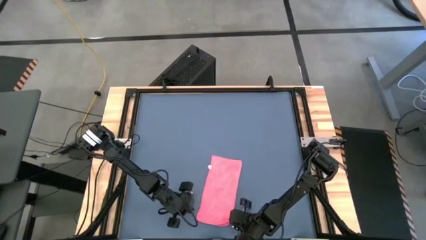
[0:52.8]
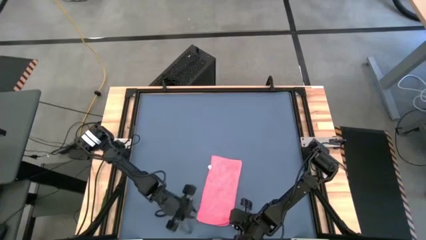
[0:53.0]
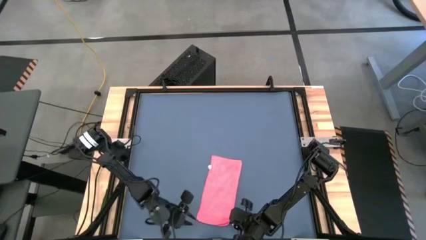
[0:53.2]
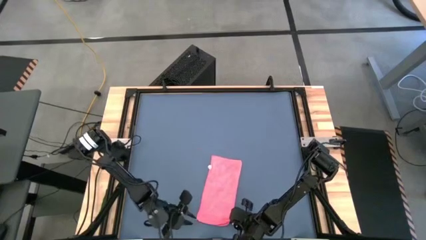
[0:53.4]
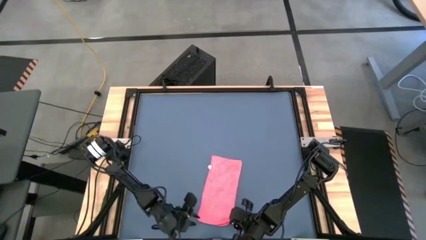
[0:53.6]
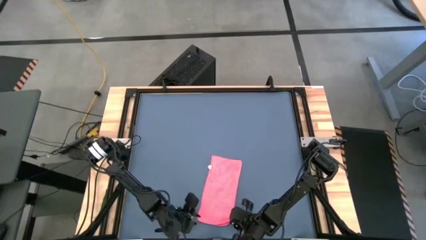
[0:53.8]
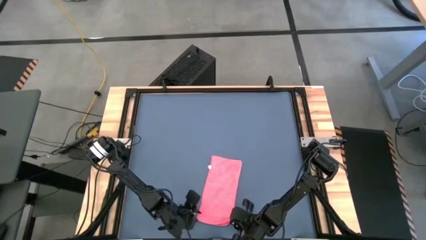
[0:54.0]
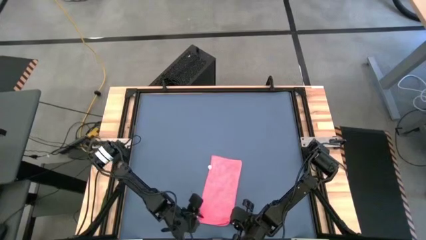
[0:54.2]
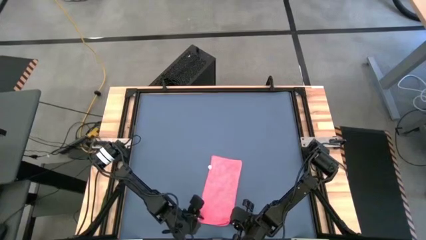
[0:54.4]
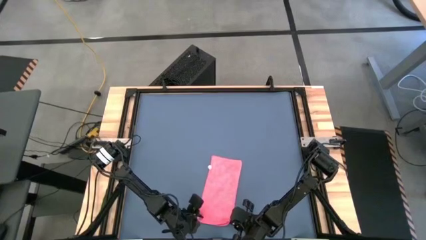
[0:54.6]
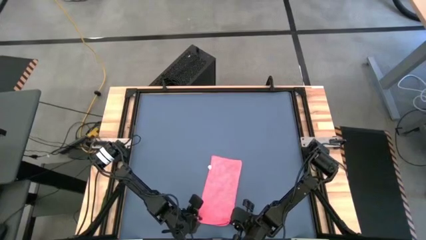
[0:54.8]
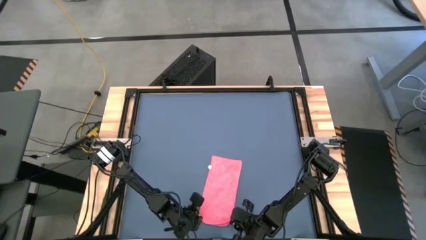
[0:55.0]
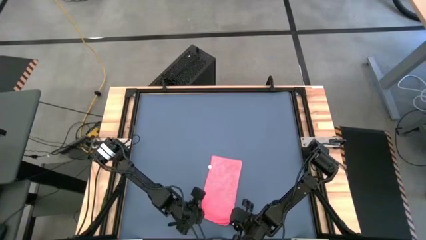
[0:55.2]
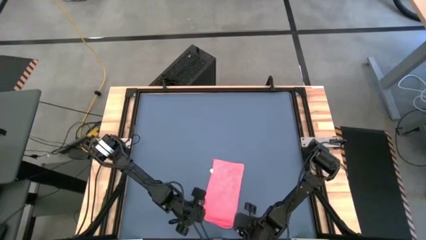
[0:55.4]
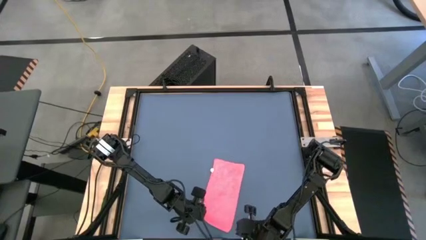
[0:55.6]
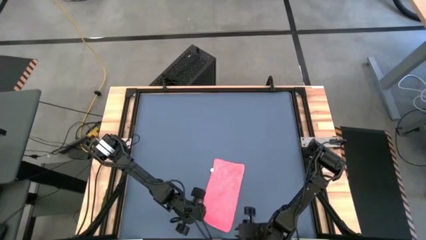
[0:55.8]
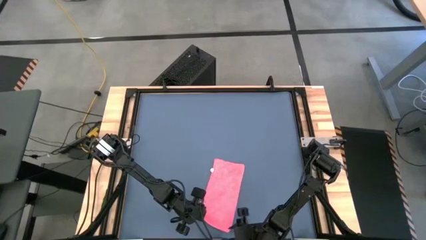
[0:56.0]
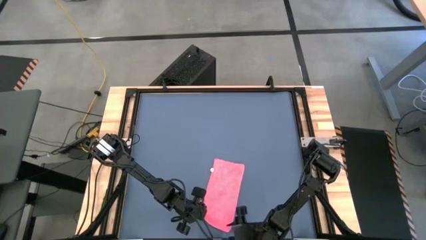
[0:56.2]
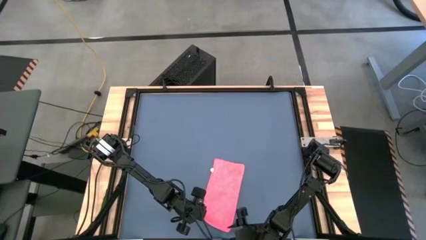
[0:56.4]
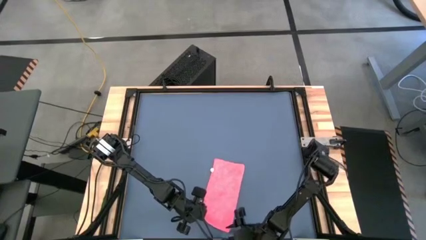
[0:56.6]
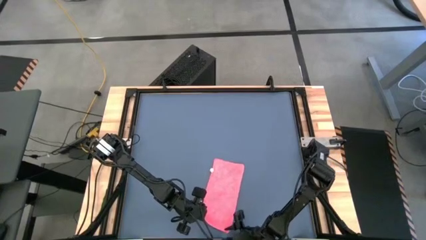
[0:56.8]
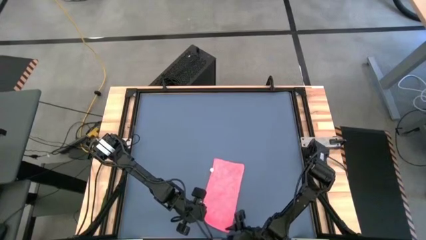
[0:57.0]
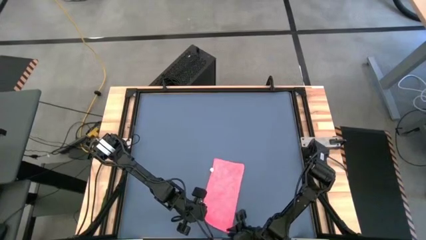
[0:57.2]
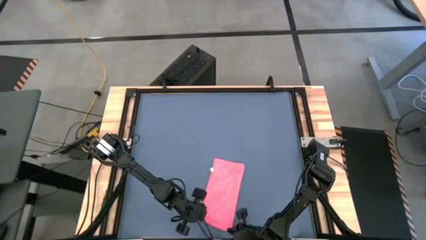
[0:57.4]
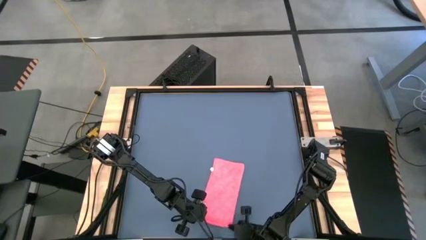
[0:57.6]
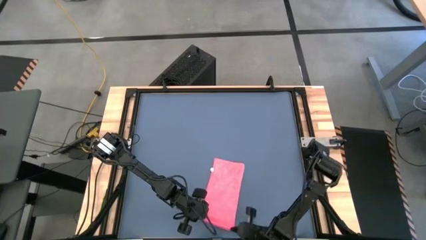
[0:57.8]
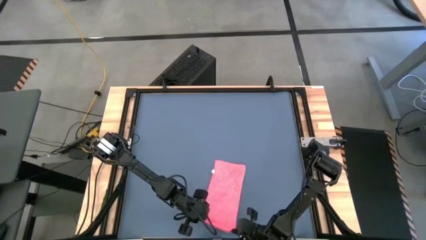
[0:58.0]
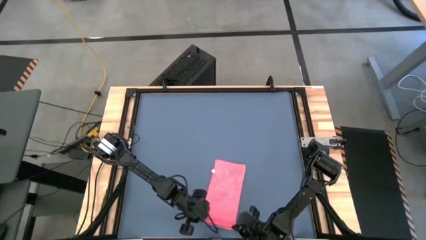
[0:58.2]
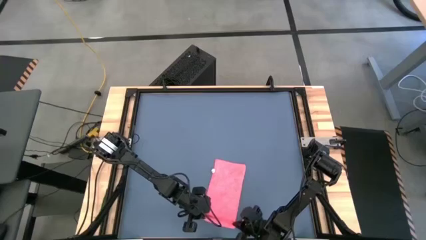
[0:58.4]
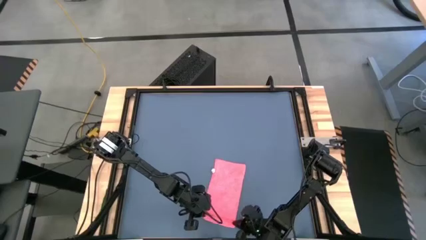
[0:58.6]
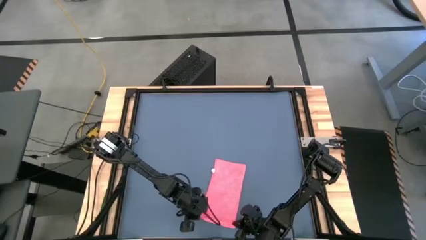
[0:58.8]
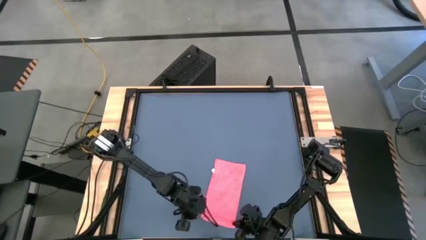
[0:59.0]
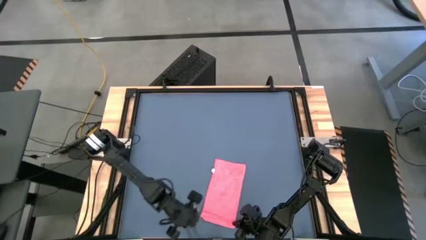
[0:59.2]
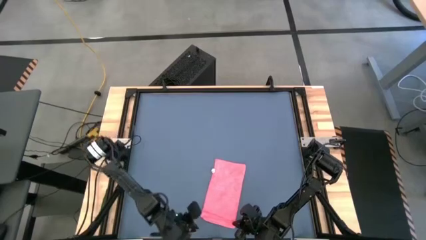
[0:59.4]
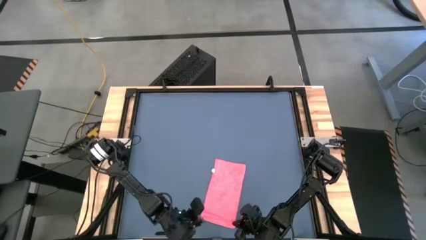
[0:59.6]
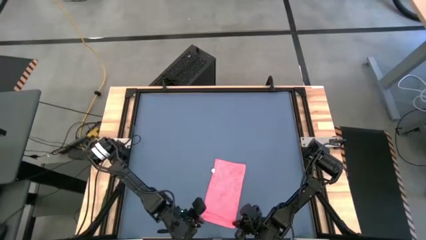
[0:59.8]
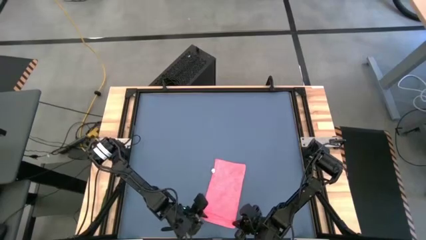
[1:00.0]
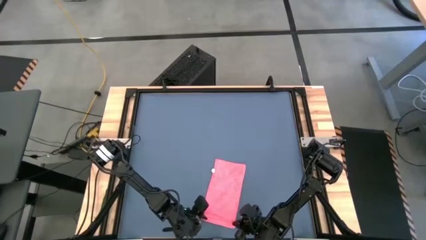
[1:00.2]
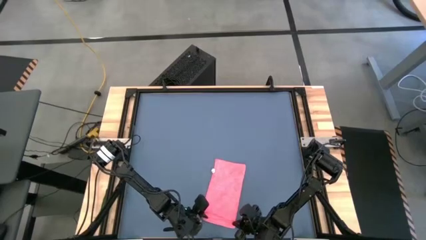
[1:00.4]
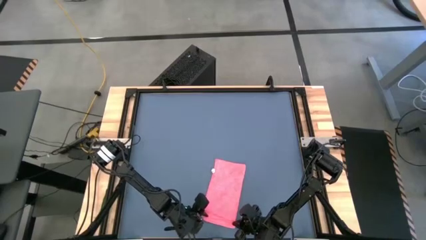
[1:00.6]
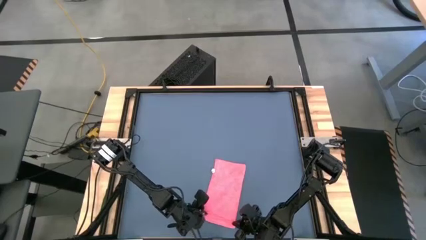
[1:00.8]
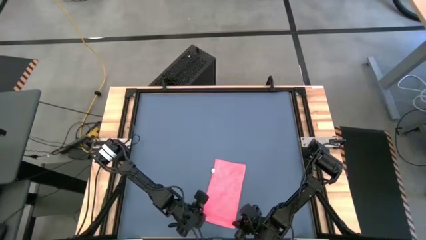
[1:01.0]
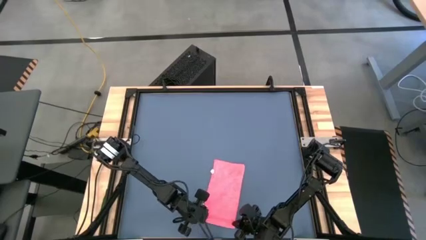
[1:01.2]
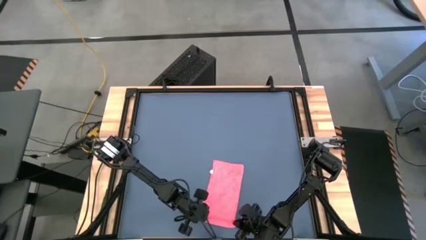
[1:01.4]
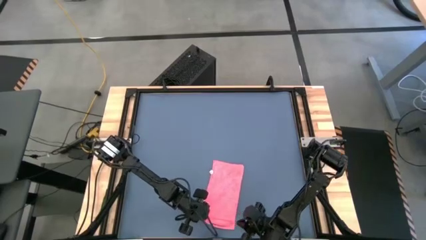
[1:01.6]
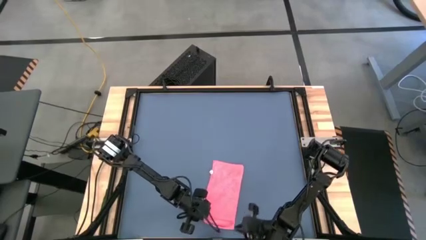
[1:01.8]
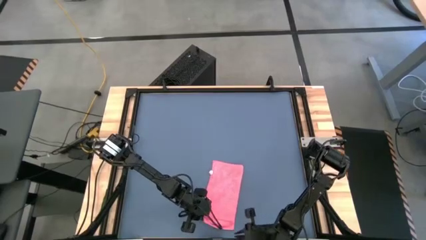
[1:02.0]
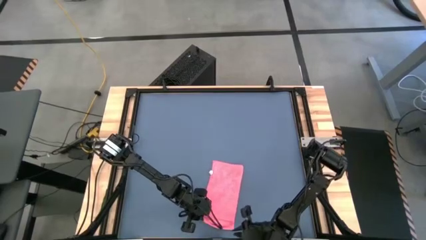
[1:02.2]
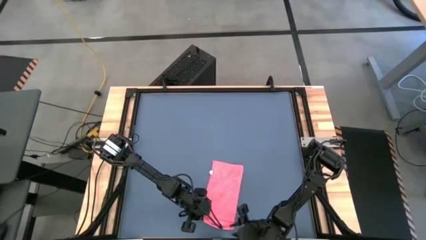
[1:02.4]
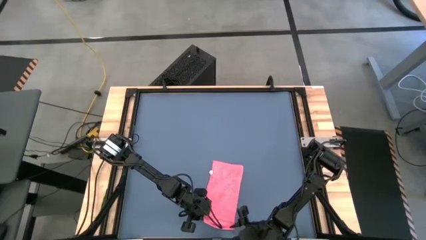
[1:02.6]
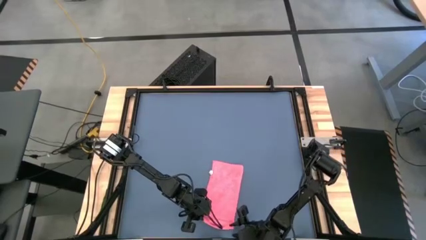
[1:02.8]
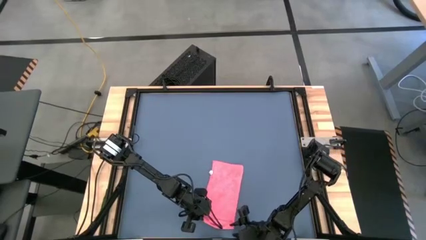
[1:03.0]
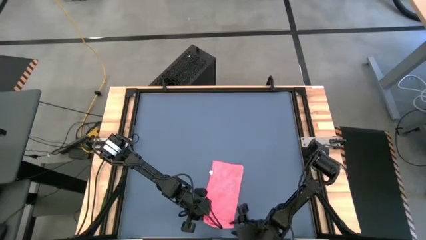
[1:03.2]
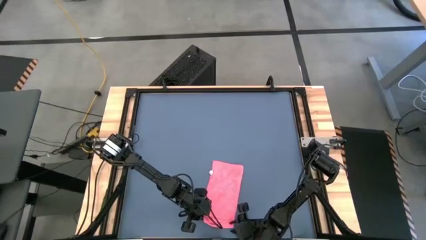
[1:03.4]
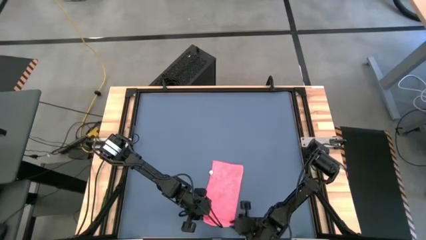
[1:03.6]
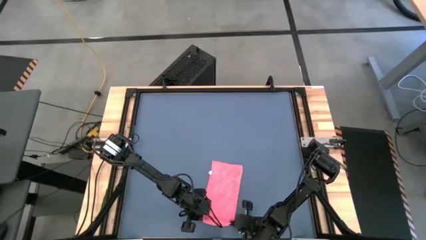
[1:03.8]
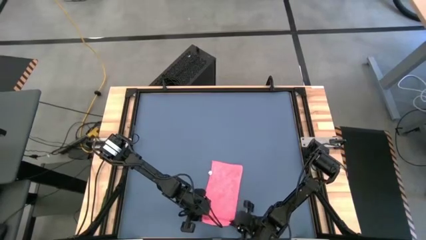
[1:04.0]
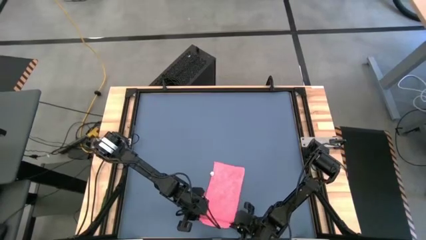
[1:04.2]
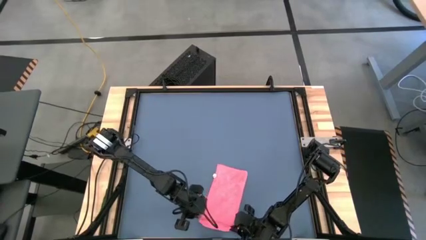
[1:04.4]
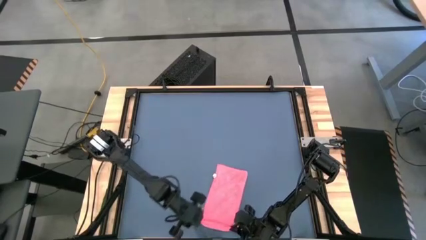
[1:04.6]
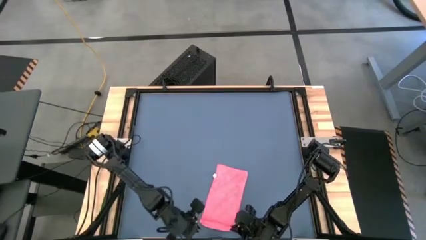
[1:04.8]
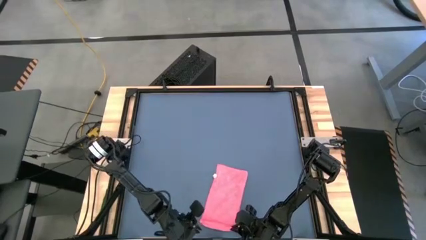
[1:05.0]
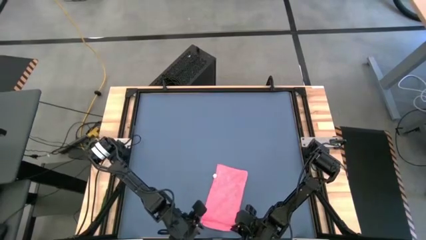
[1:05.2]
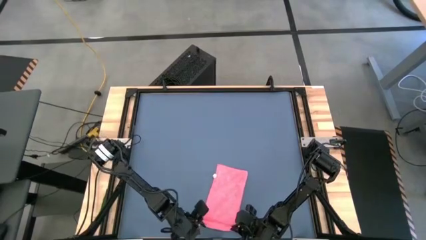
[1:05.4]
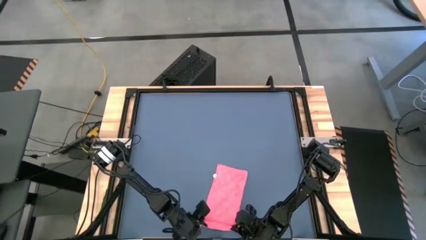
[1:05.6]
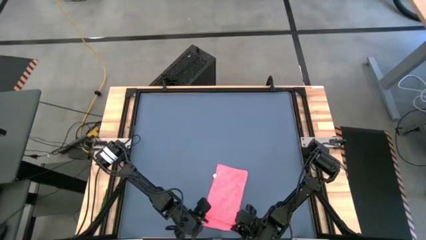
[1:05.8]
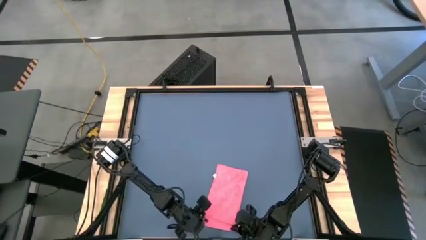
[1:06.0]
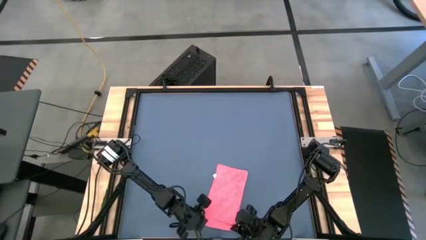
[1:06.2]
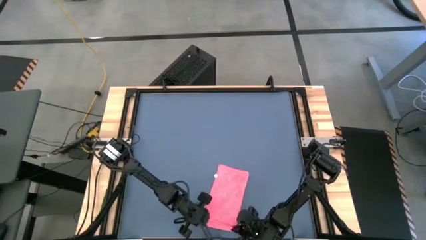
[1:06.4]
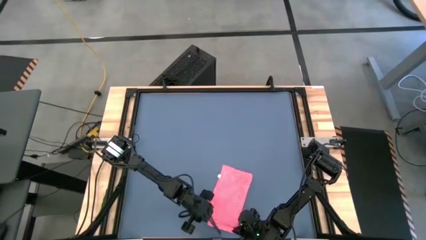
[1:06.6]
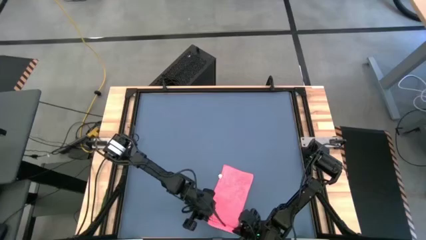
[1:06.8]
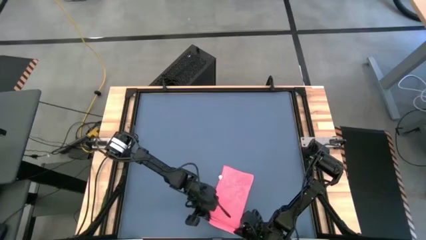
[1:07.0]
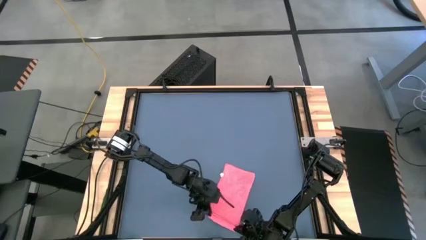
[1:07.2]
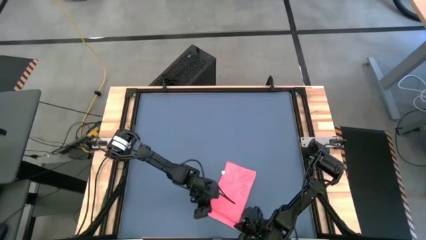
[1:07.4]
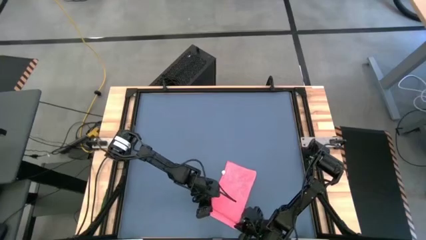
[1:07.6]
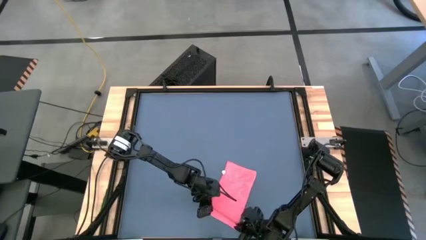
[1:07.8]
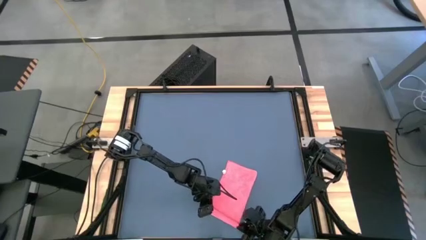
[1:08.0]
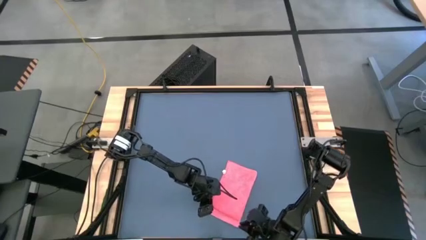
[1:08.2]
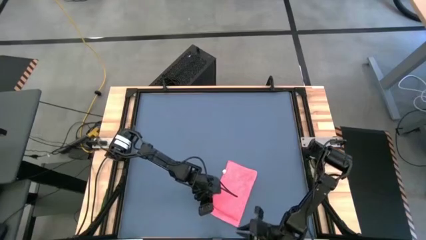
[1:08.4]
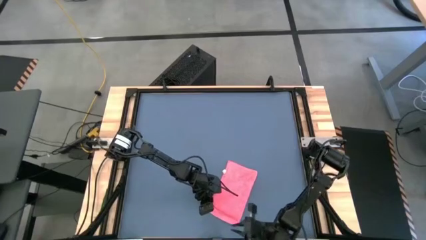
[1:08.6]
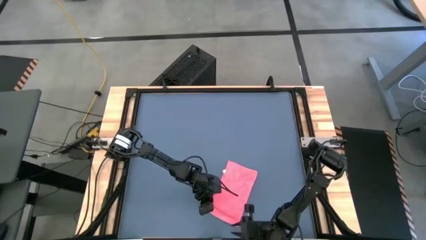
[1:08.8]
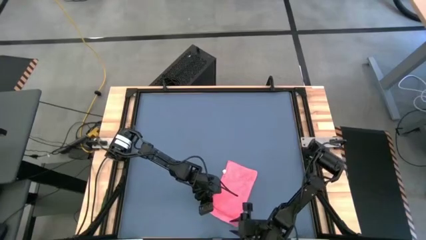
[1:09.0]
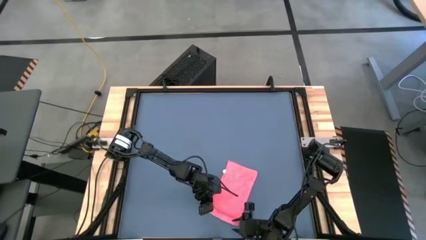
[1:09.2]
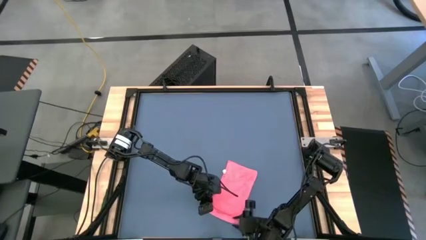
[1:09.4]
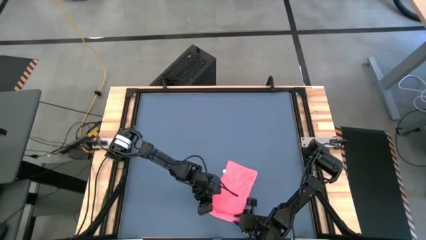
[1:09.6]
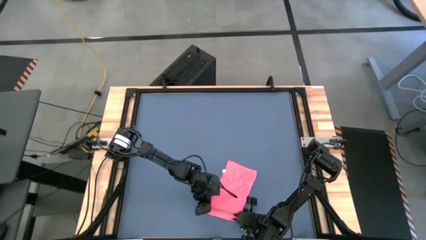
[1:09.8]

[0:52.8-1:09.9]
Task: Roll towel
Roll the microfiber towel
